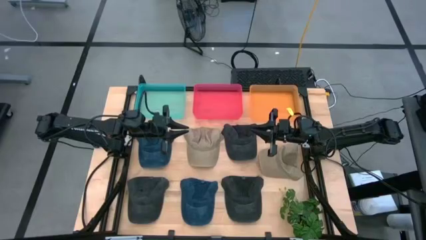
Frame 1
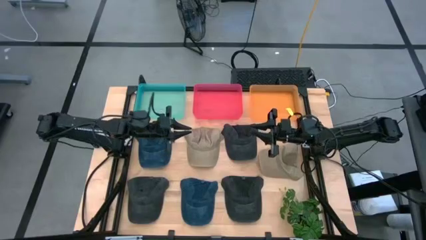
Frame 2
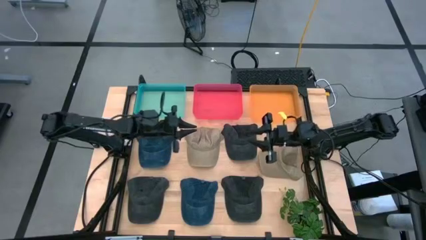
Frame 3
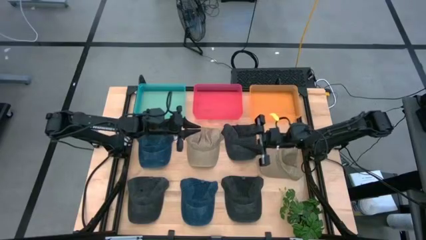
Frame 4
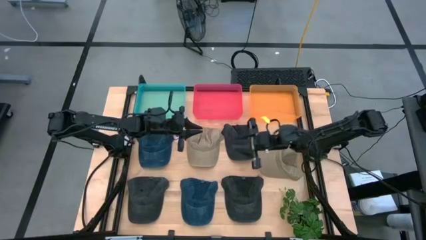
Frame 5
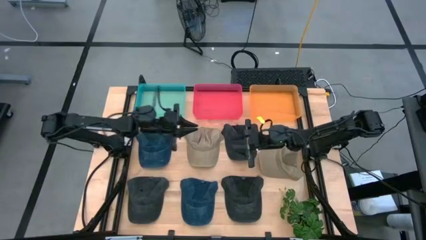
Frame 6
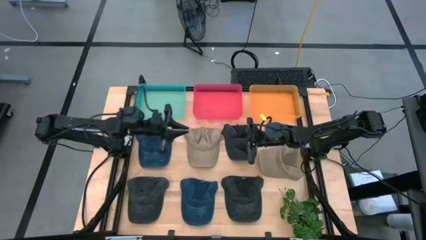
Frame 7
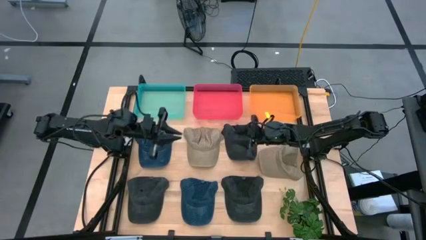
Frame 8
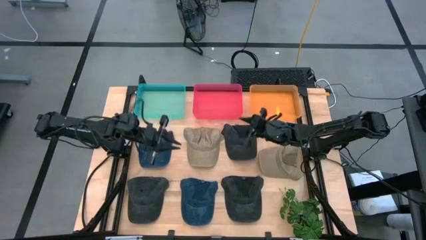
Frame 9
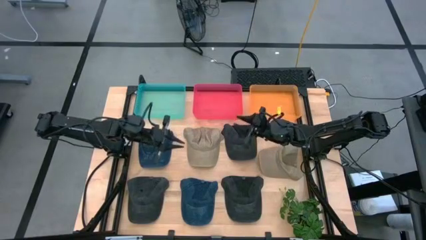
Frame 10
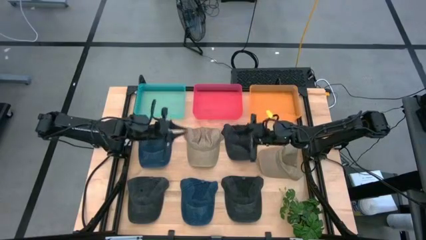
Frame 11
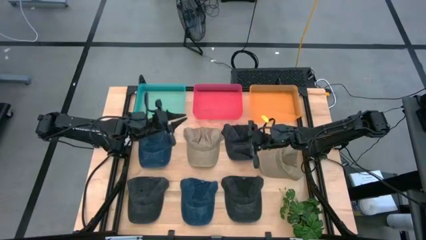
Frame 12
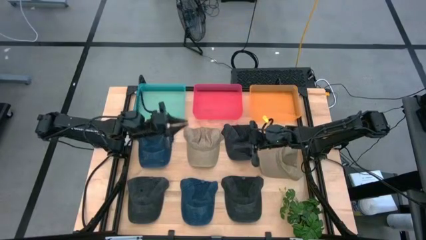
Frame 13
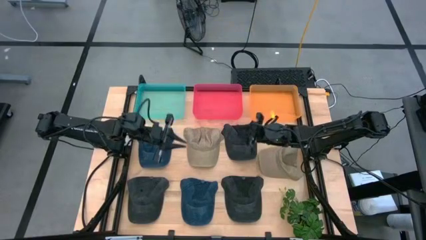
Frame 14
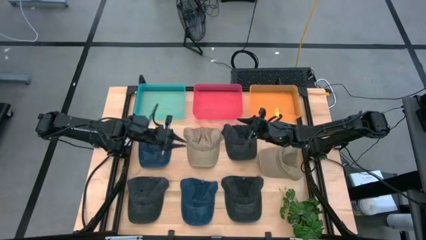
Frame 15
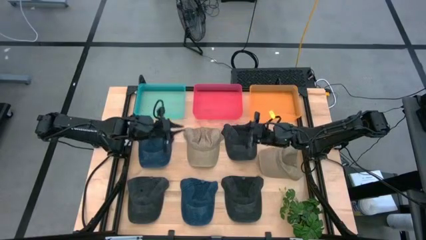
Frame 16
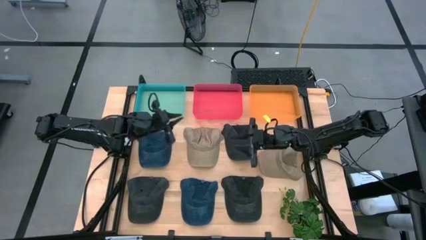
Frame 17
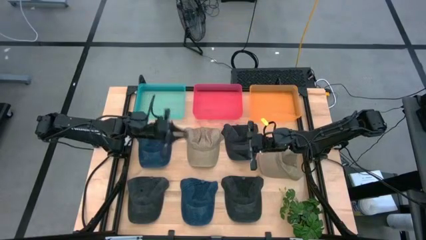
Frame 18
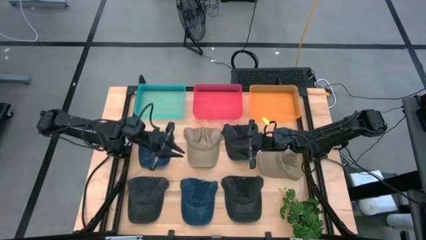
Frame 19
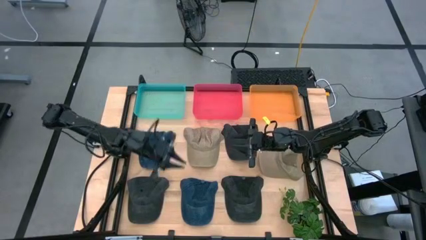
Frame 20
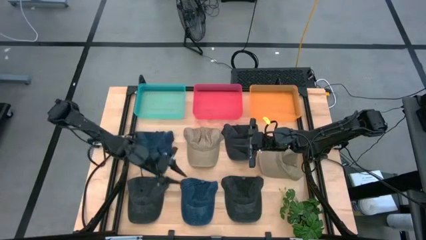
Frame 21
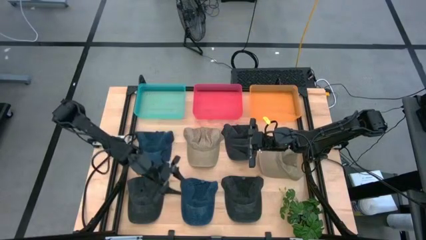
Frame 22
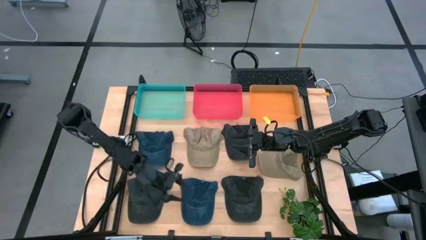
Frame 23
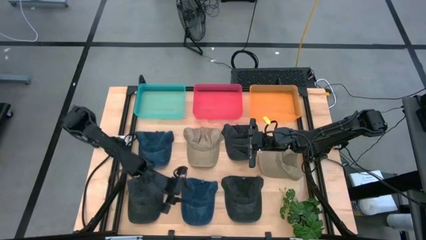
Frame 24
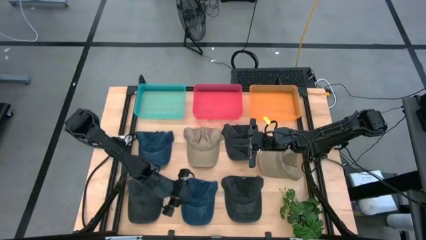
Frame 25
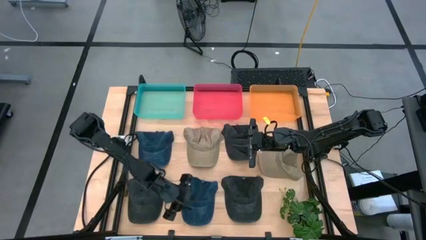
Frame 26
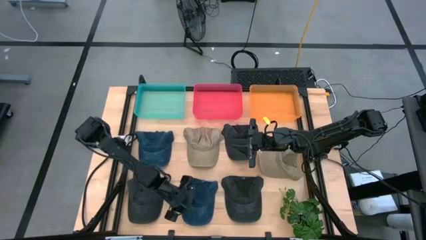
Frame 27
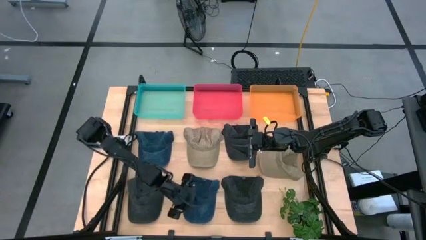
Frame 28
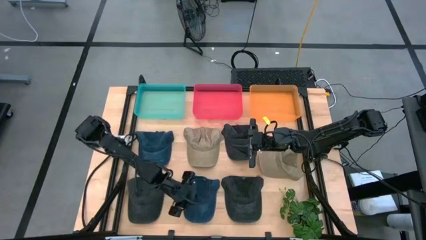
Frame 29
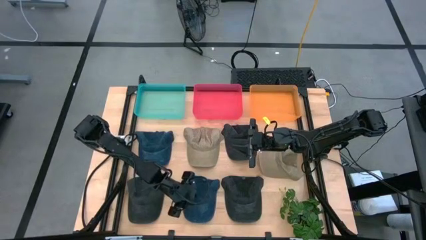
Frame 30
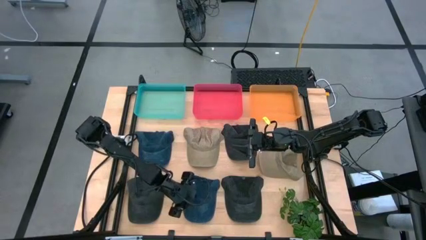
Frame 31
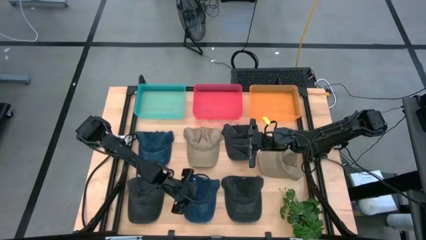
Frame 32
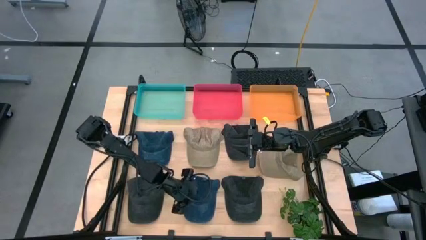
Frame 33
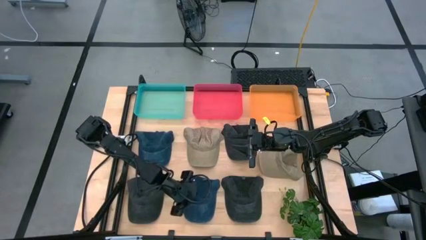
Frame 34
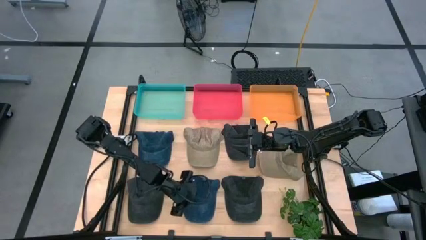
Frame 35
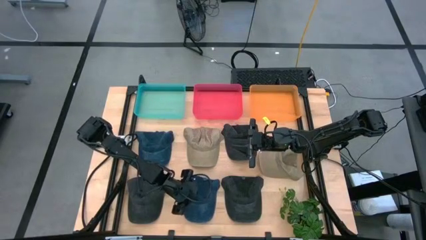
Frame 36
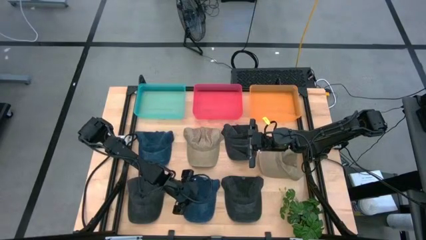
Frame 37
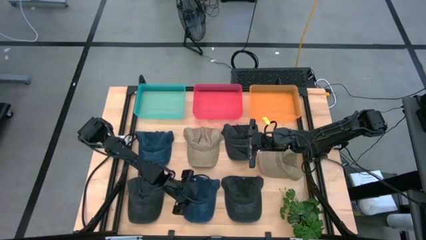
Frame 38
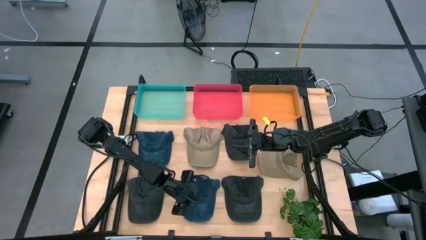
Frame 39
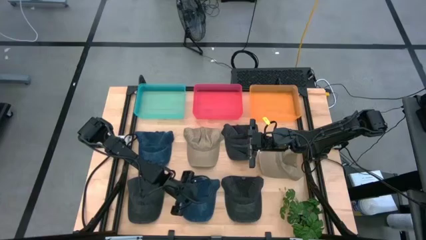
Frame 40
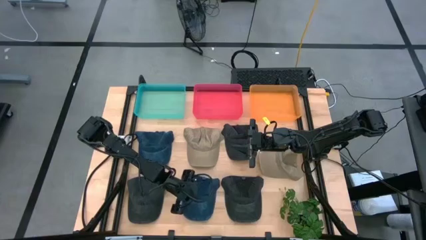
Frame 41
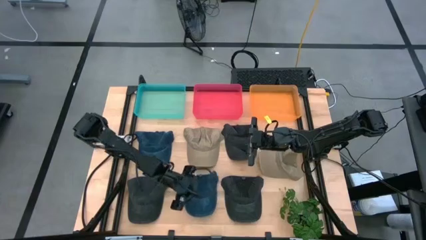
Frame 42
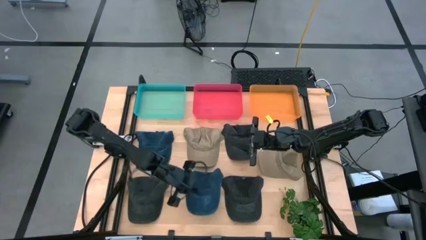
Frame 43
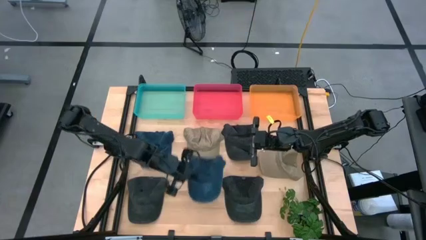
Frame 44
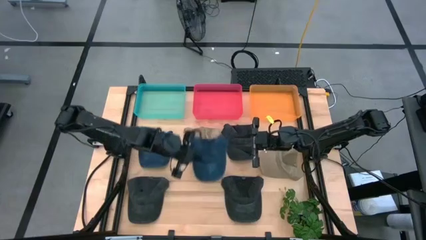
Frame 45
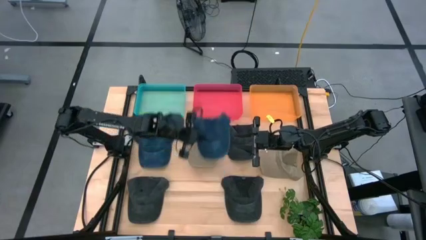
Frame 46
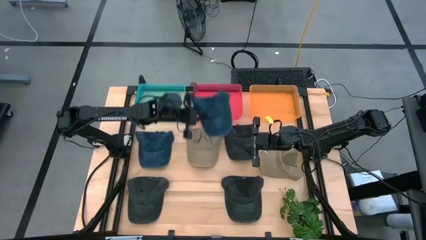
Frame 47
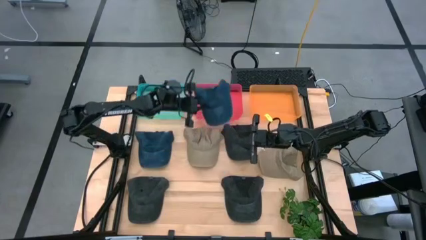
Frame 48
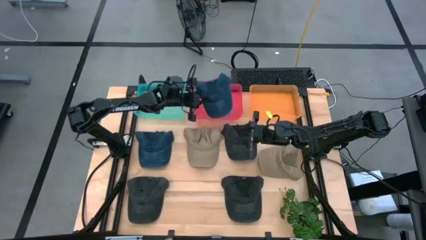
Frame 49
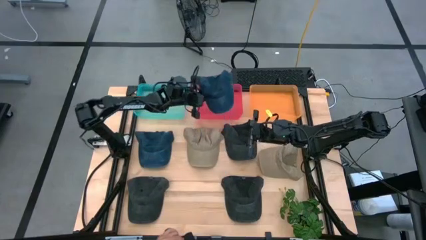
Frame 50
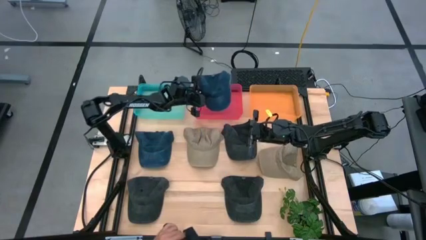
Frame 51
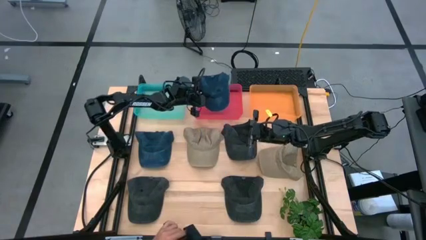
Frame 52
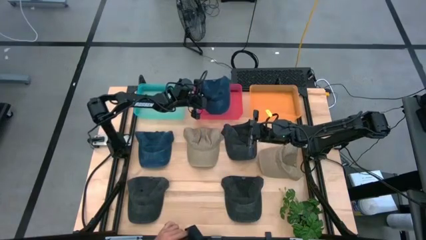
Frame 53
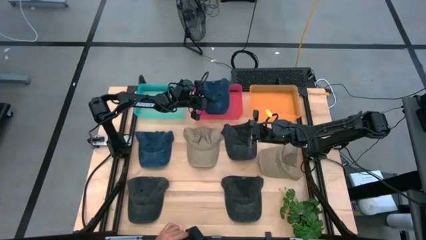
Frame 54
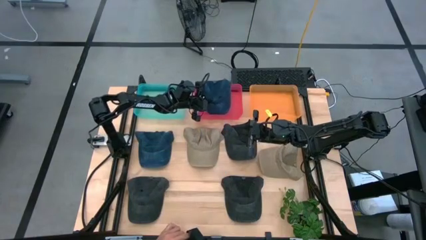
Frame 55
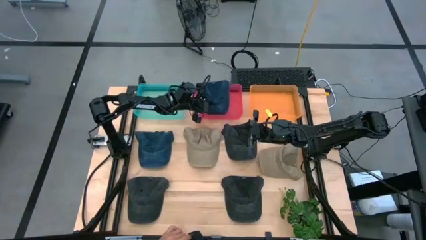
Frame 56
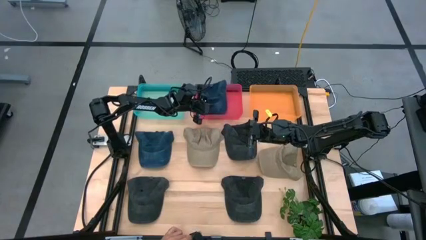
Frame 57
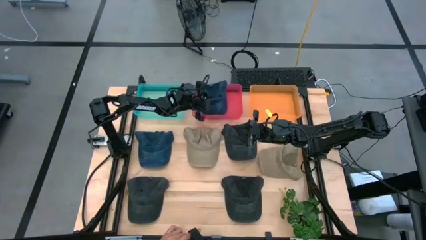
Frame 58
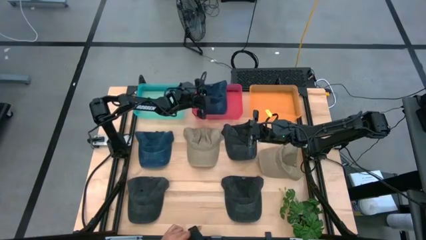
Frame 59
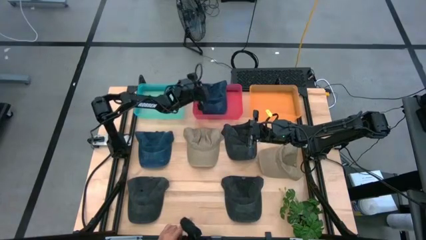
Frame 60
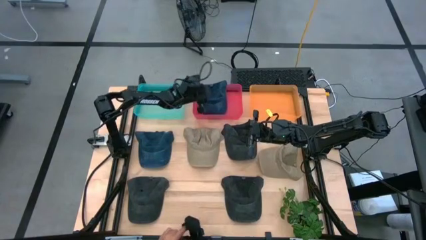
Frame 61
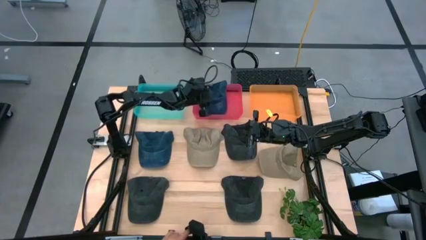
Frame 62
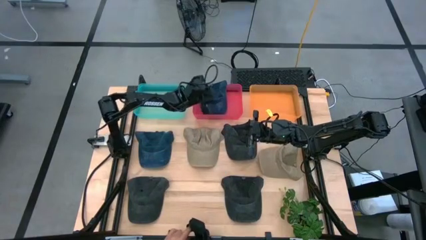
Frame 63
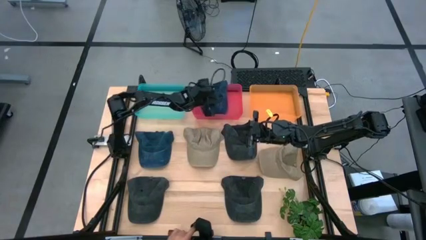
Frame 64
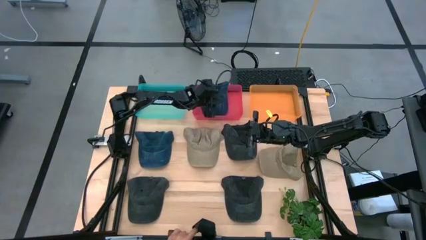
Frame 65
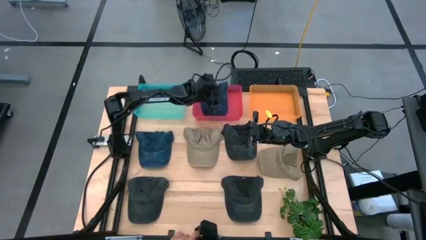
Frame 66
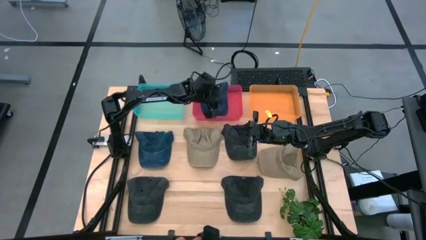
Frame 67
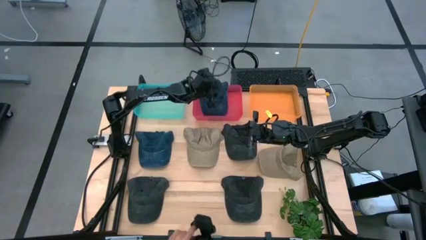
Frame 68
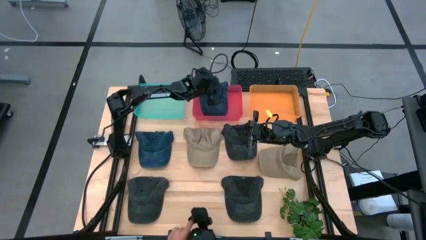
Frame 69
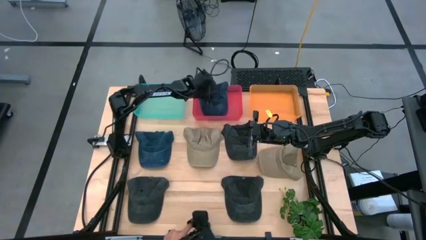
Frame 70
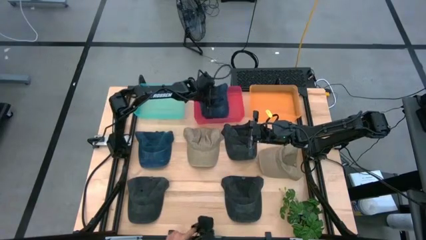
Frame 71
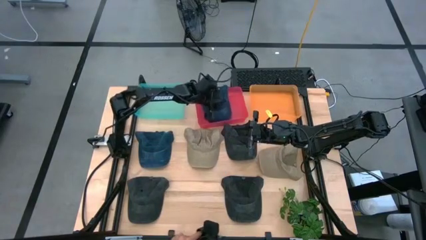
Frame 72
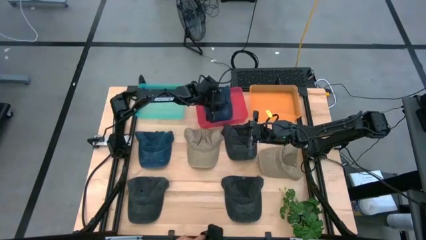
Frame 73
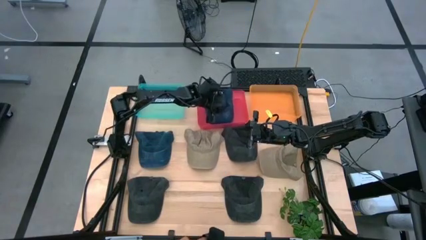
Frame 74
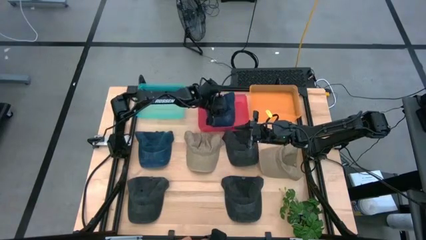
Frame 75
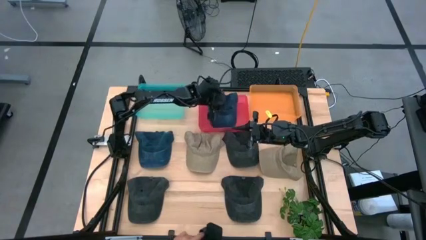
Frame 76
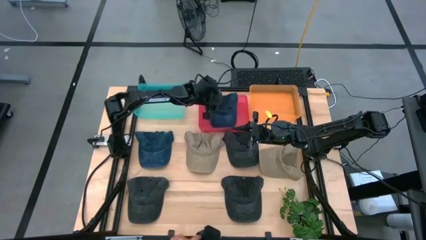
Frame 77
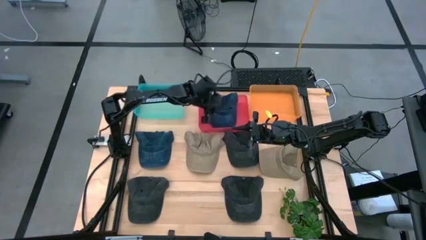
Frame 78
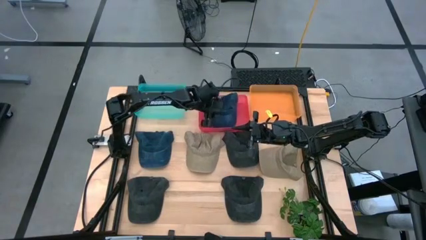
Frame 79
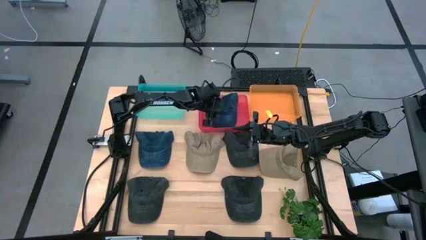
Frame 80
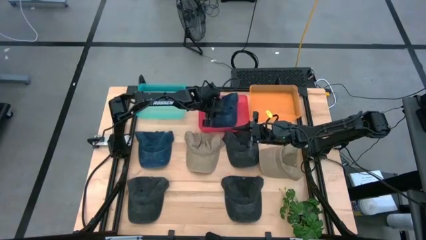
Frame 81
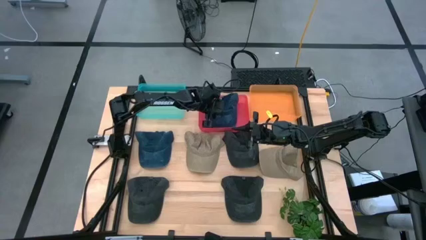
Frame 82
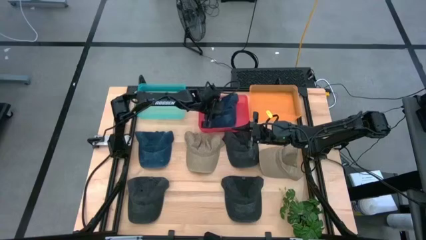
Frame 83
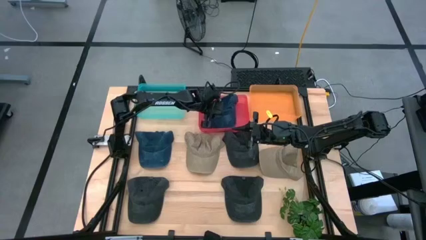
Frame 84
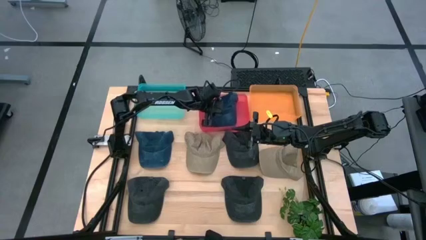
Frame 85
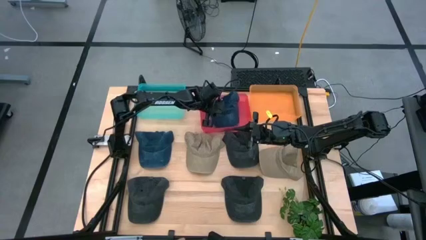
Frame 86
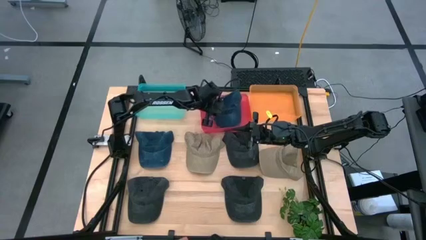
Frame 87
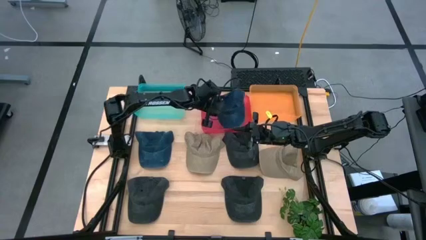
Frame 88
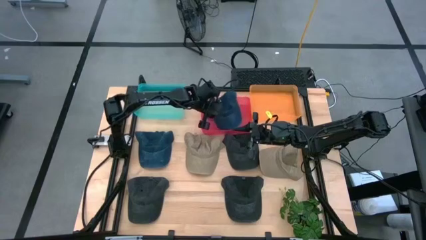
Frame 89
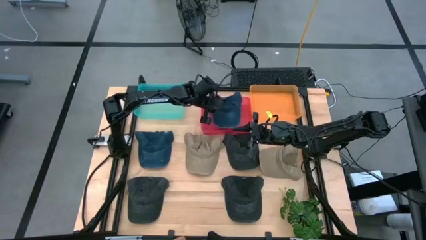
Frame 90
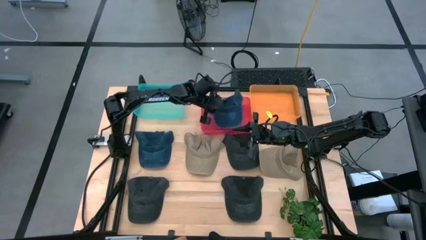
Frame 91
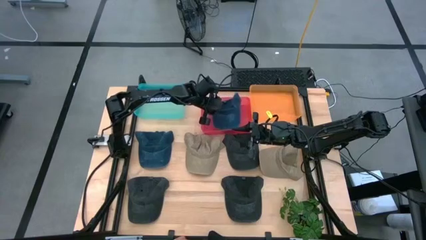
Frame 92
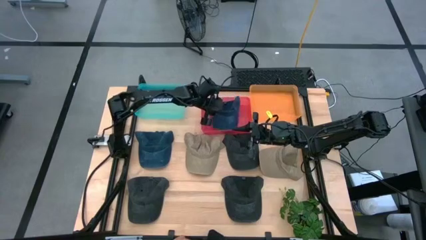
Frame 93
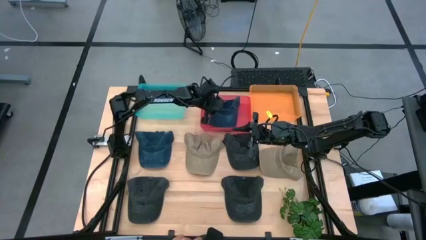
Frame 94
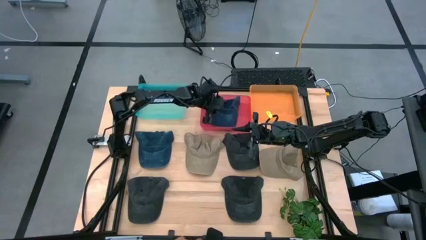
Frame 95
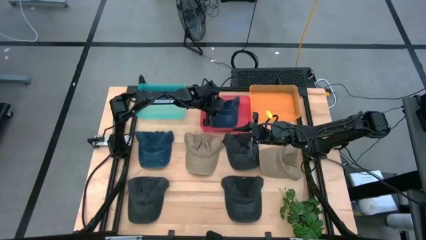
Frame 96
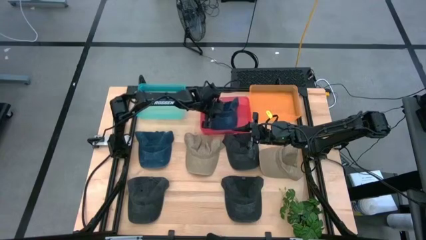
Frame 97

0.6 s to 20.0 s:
Task: Pick & Place hat
Put the bottom blue cap into the red bin
